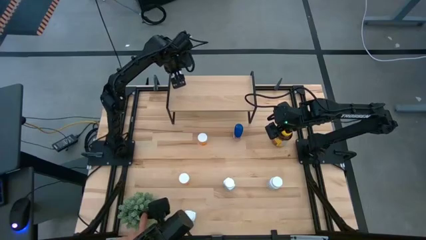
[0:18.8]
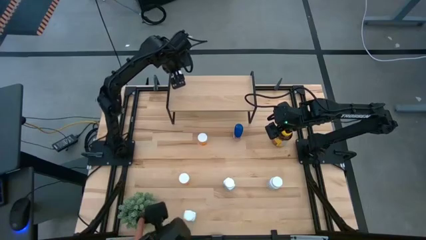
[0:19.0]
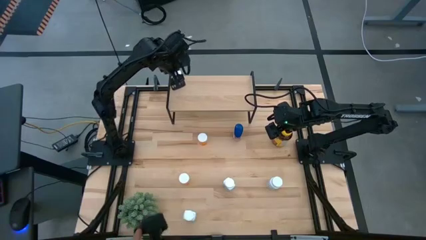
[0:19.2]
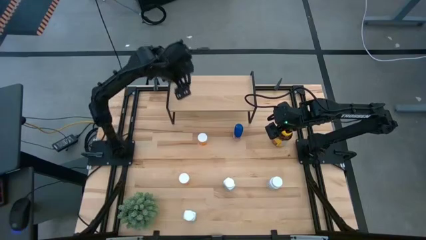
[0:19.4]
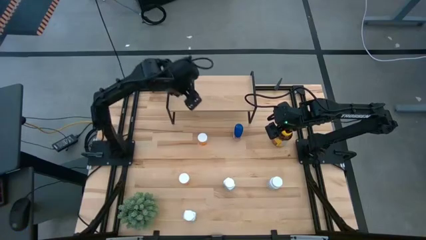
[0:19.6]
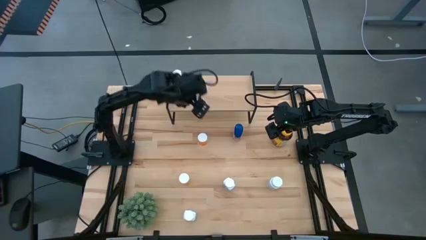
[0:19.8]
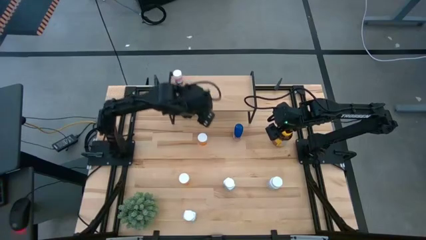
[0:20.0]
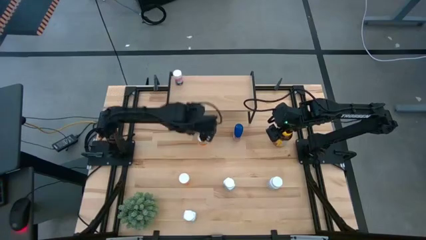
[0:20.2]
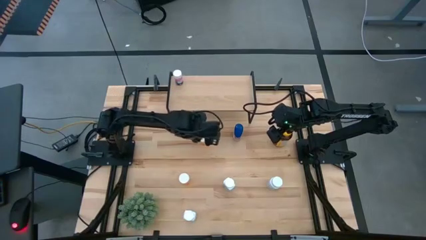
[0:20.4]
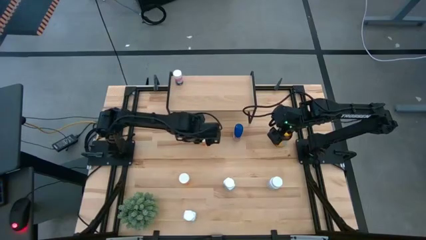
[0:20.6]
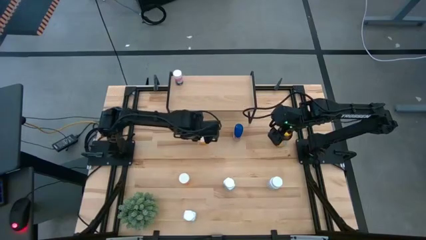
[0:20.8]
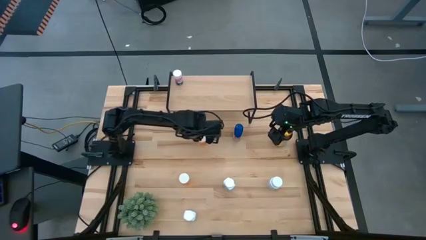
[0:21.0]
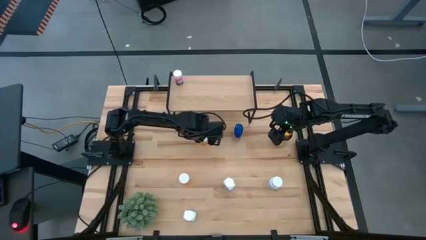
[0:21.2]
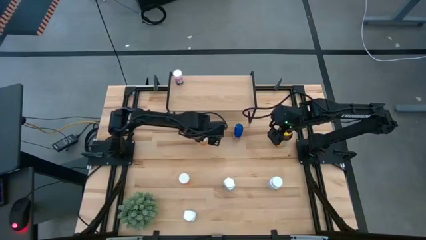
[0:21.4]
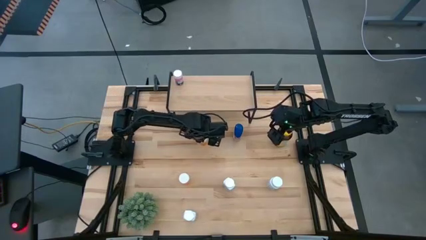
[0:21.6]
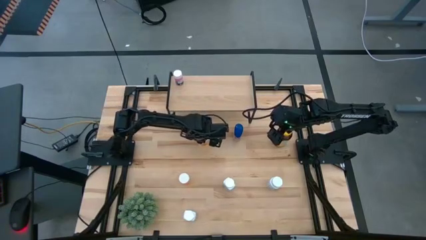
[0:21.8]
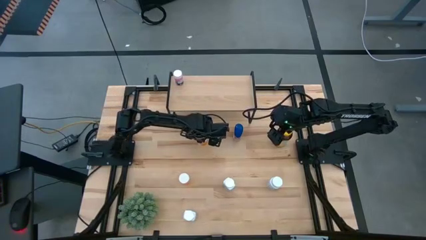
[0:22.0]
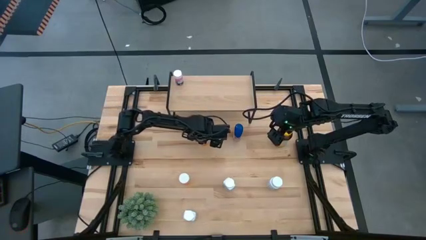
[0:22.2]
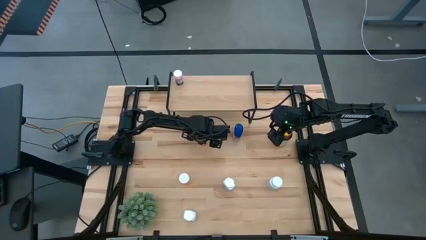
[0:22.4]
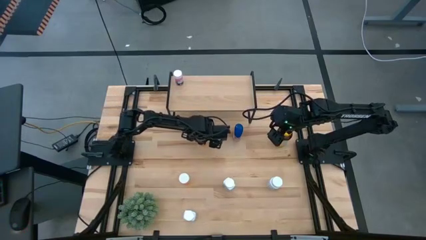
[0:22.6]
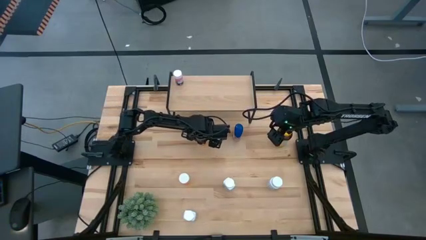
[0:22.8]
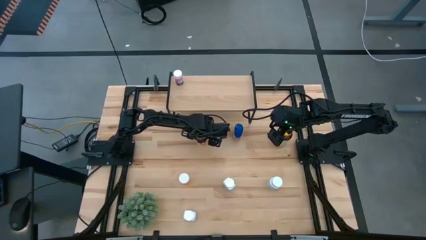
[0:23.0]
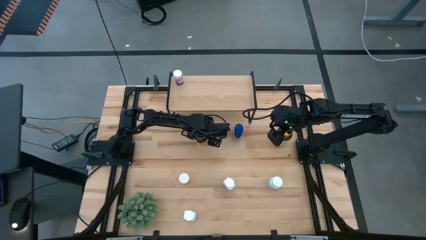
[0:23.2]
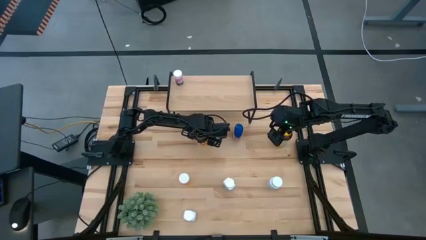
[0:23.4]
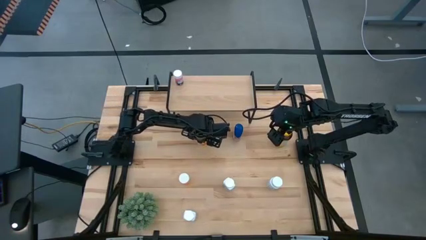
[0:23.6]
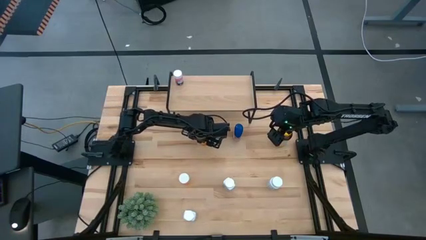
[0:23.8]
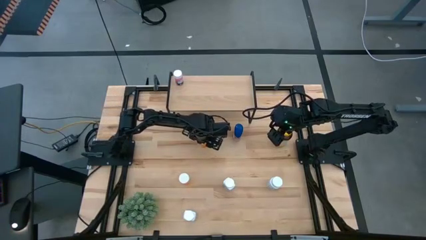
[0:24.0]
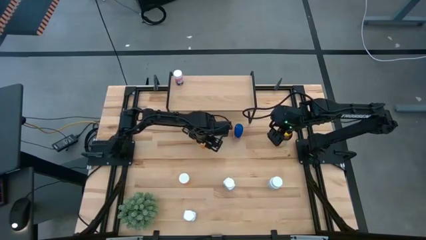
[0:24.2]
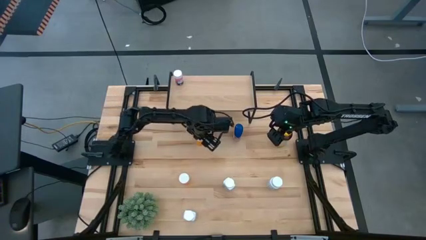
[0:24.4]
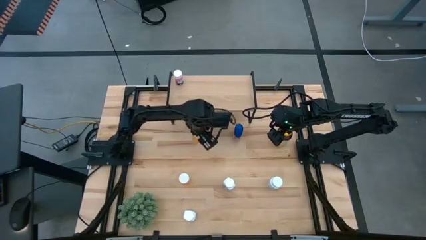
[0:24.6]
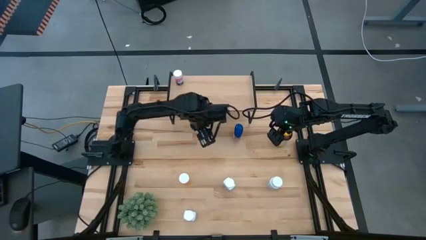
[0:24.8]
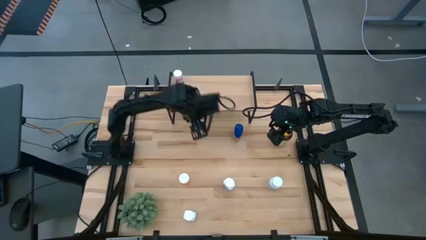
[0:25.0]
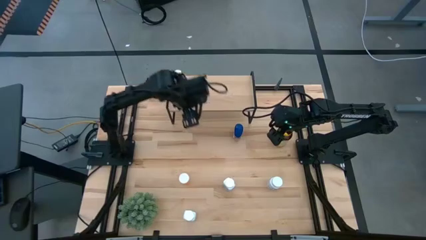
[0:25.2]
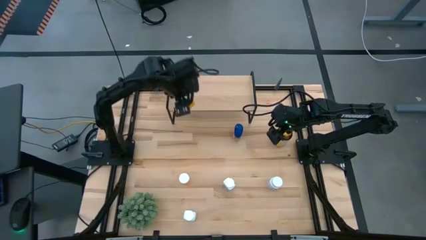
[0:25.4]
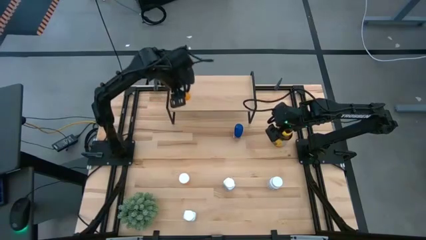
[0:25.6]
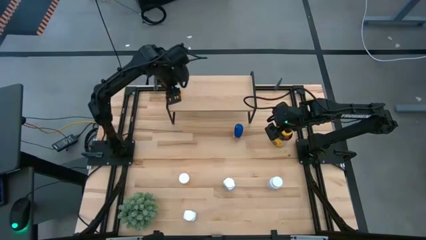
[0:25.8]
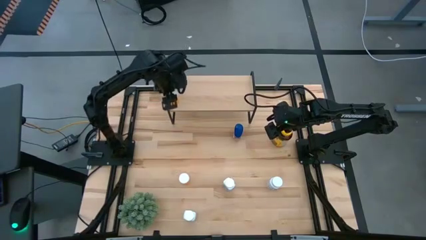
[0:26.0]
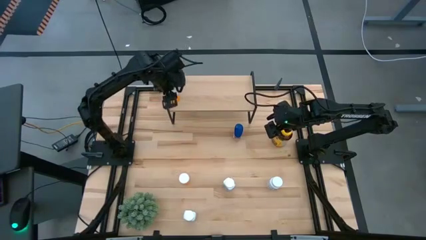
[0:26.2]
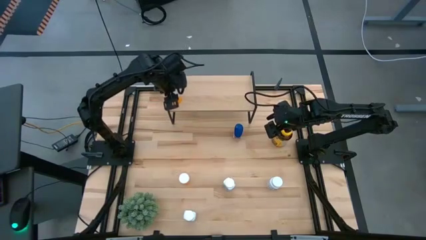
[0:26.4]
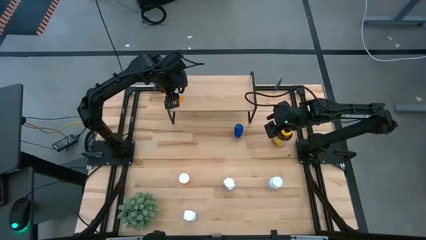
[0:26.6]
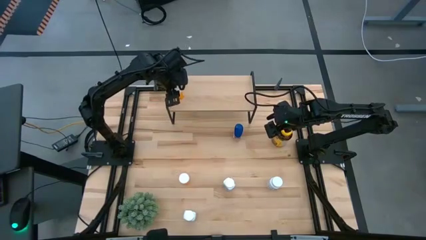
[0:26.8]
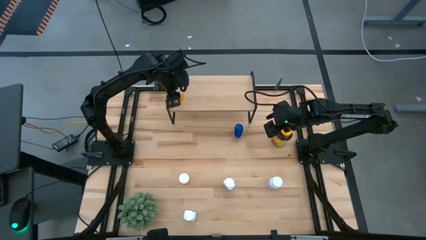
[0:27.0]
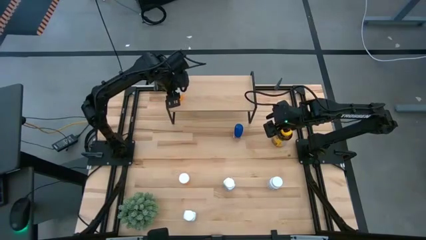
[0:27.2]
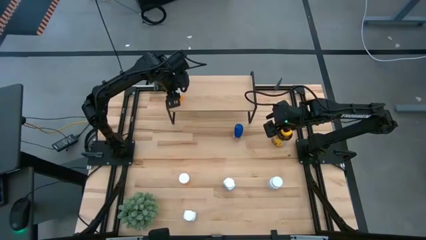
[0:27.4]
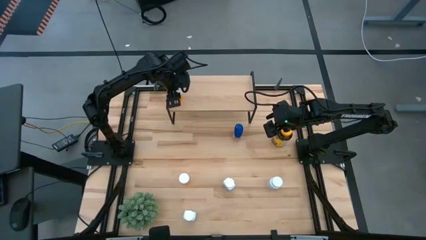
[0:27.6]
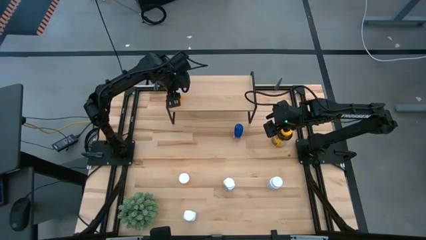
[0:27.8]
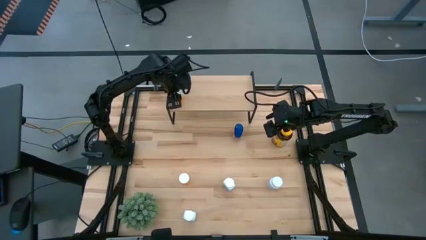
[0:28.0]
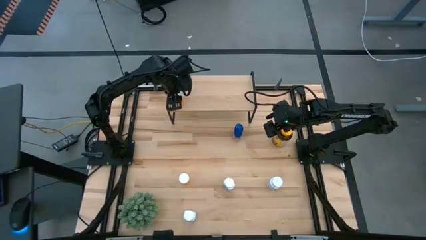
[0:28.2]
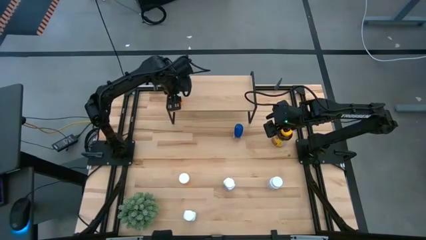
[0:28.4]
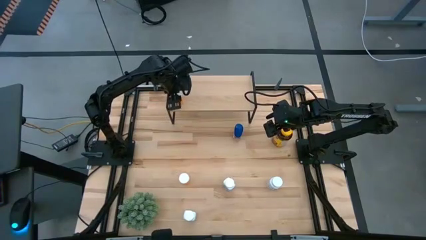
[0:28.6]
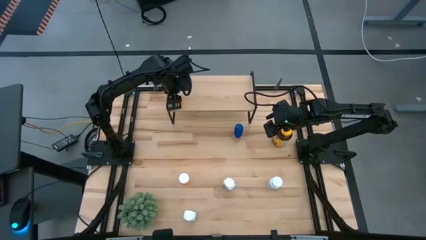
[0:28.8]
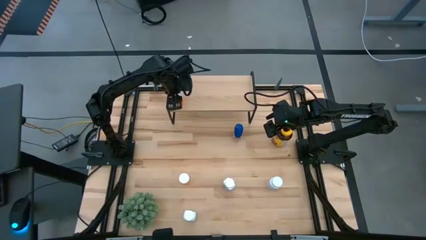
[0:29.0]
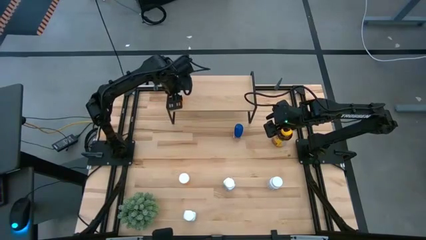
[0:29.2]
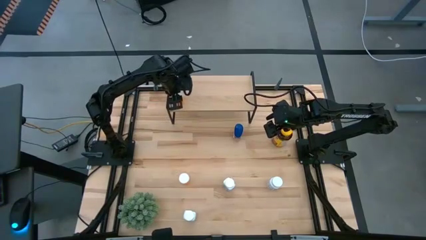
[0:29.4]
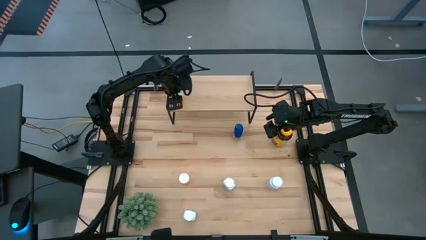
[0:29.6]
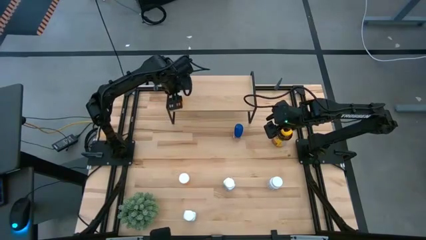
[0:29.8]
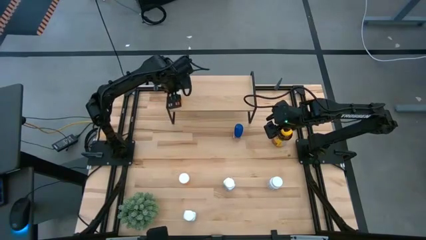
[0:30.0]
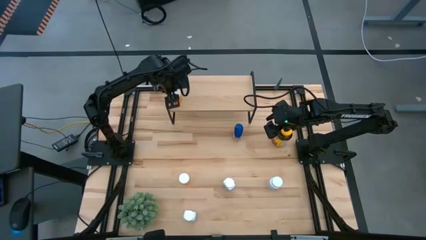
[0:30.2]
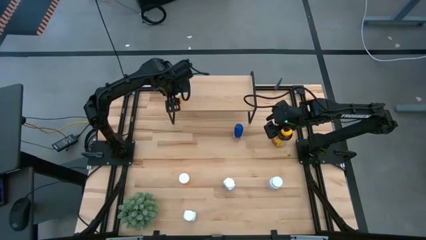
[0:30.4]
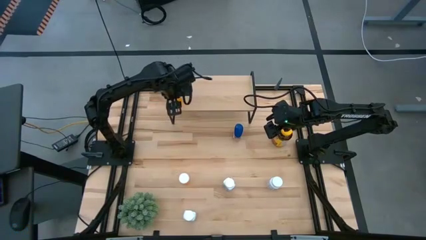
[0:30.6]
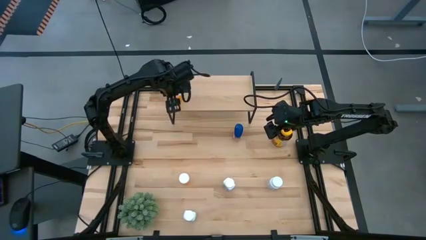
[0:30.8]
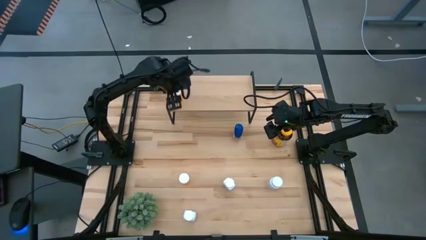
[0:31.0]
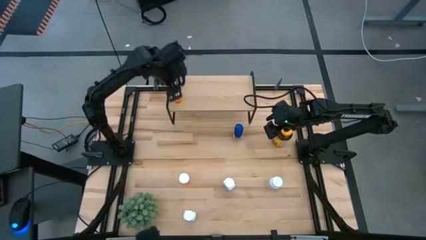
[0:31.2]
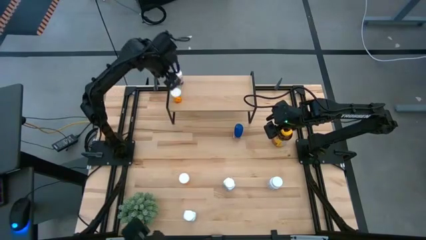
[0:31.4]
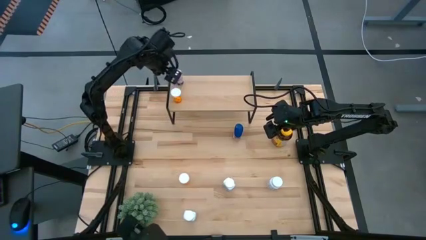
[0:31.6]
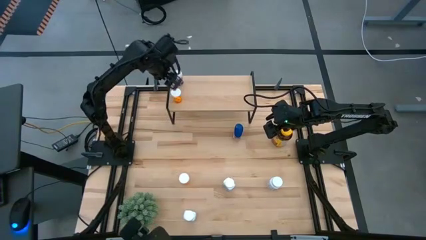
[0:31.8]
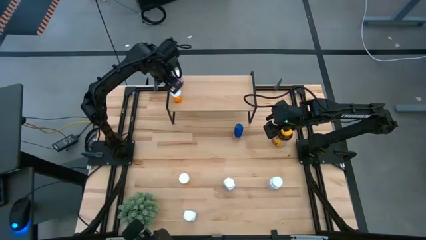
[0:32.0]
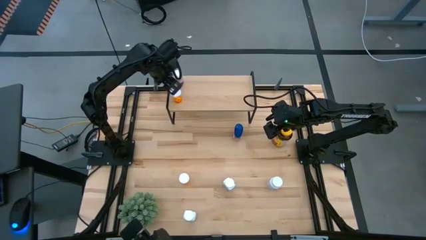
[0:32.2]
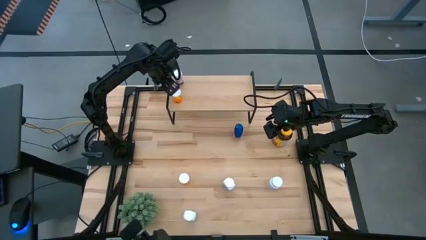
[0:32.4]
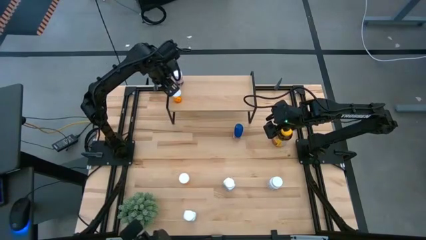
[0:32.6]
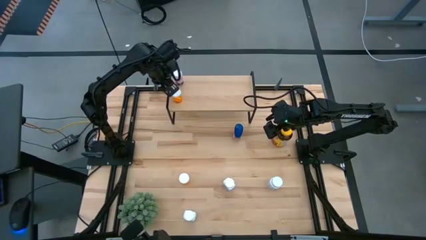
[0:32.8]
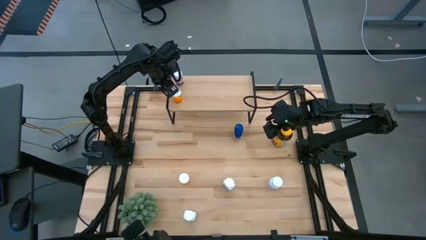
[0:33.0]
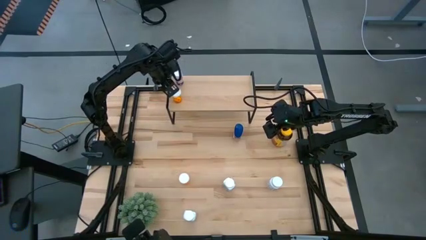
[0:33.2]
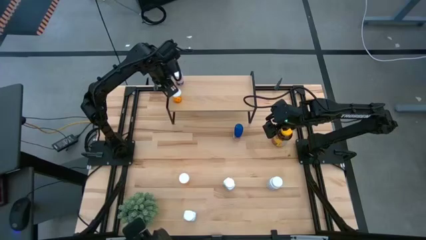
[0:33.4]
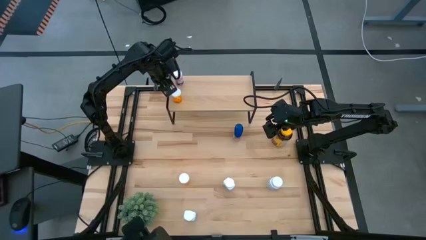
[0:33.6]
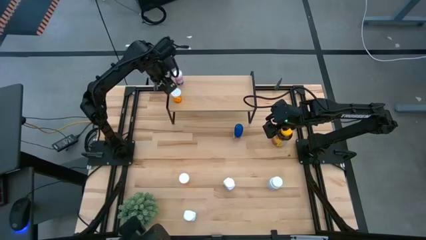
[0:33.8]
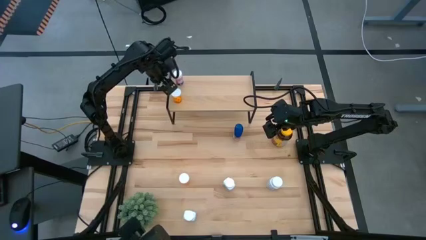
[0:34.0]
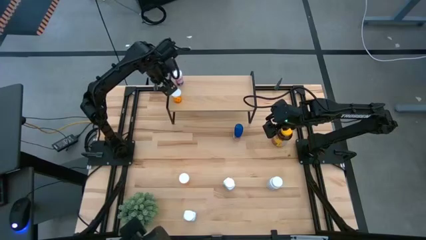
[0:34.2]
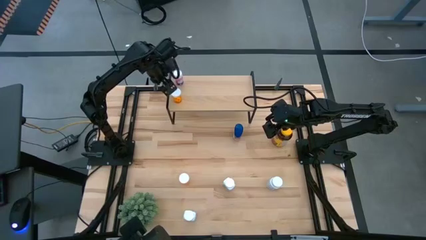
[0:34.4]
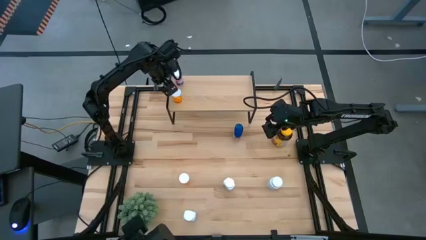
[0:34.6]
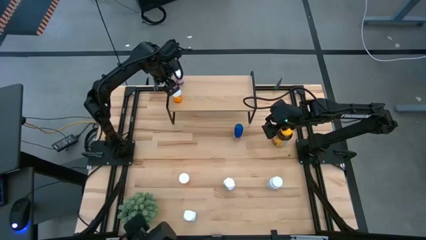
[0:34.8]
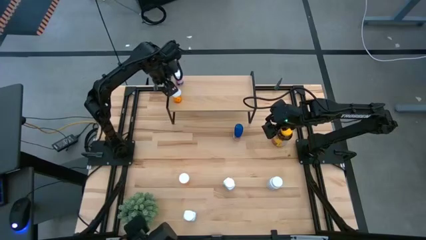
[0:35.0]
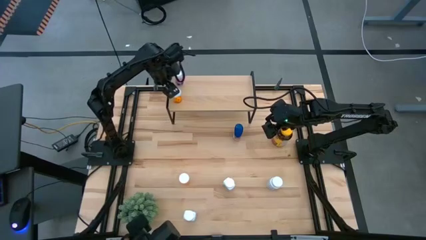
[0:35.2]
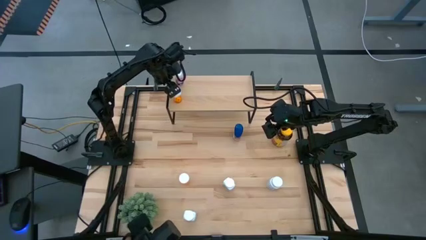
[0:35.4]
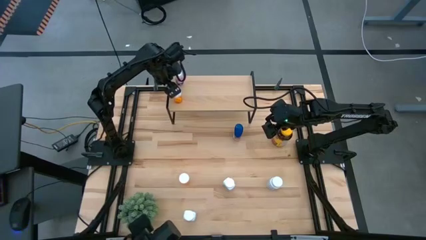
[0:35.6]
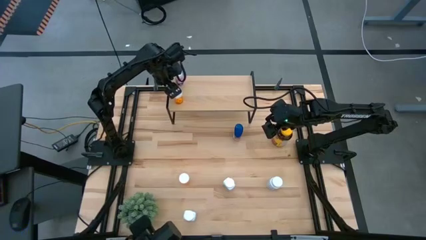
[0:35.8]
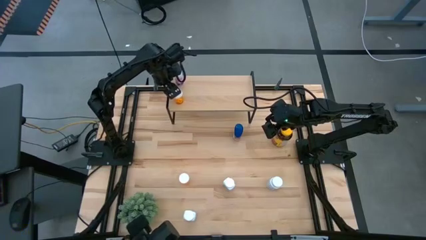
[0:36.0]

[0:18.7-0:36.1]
Task: Pick and place medicine bottles onto shelf by color
Put the top orange medicine bottle on the shelf
